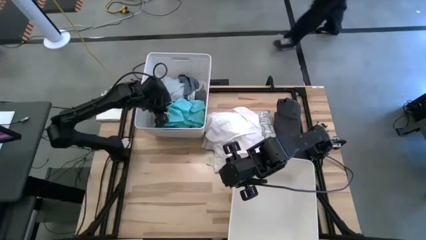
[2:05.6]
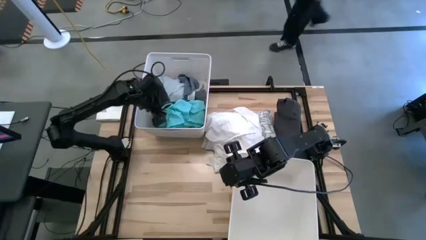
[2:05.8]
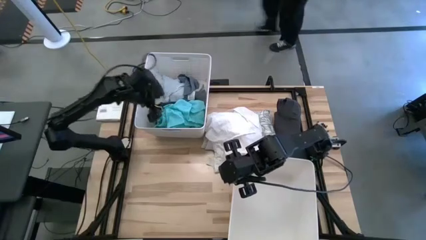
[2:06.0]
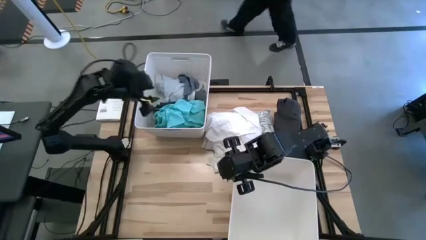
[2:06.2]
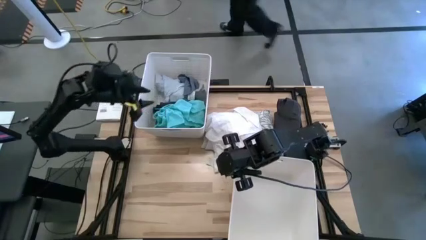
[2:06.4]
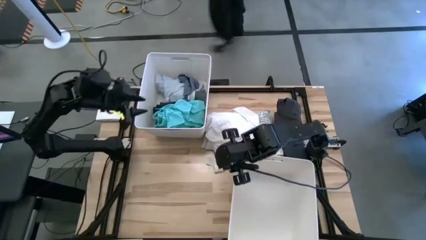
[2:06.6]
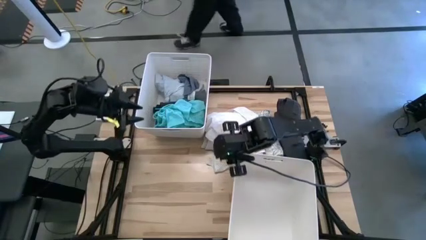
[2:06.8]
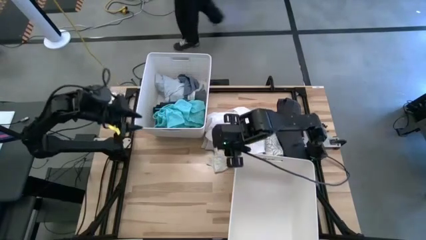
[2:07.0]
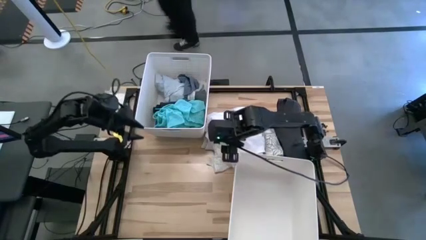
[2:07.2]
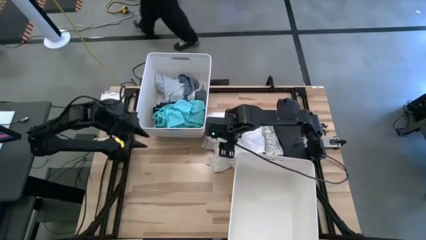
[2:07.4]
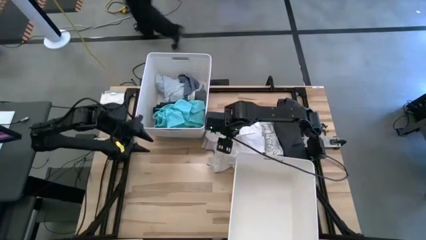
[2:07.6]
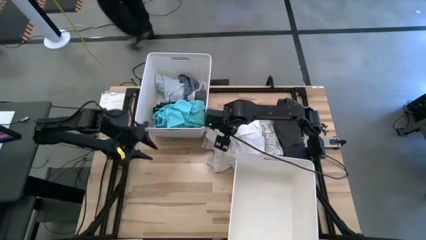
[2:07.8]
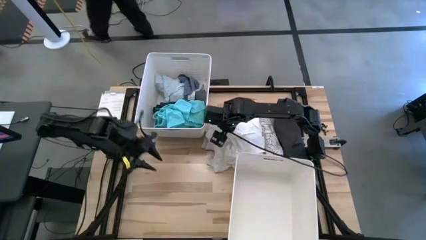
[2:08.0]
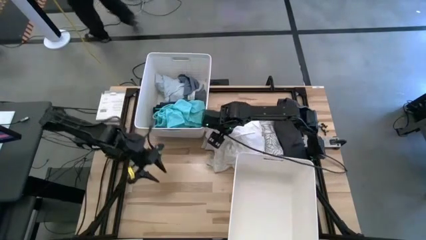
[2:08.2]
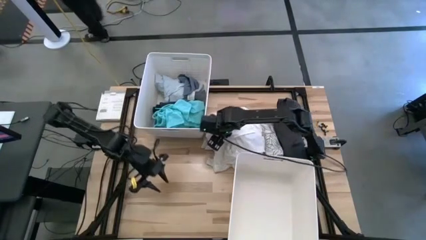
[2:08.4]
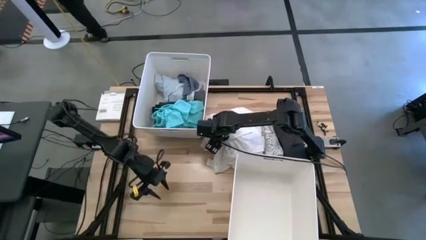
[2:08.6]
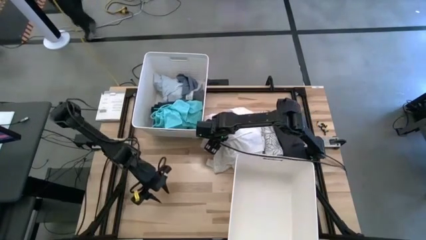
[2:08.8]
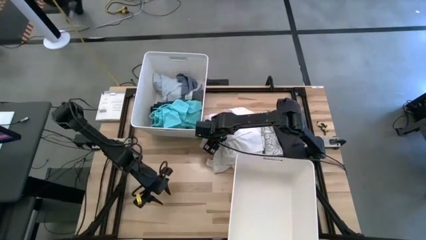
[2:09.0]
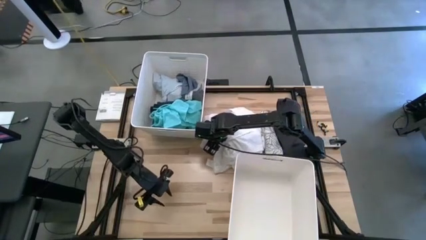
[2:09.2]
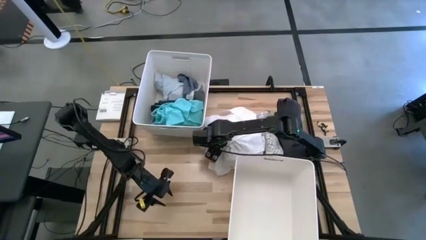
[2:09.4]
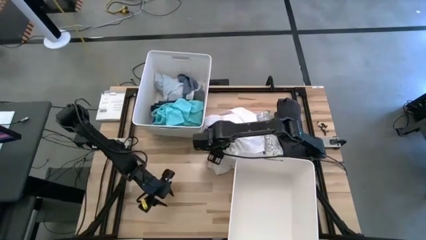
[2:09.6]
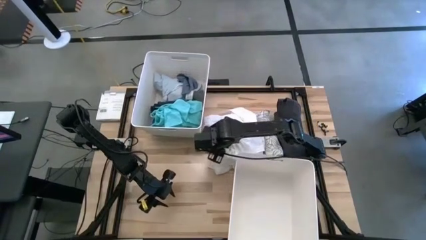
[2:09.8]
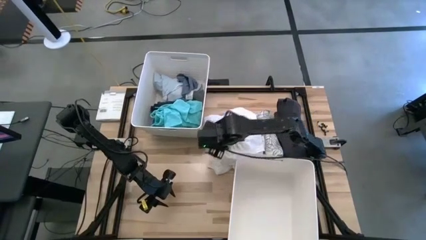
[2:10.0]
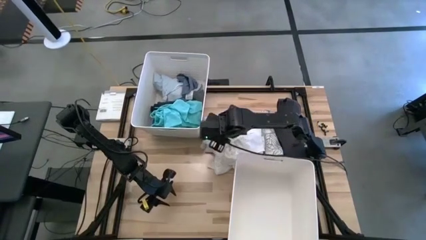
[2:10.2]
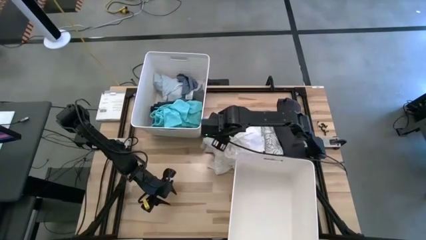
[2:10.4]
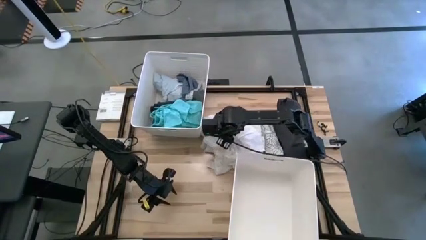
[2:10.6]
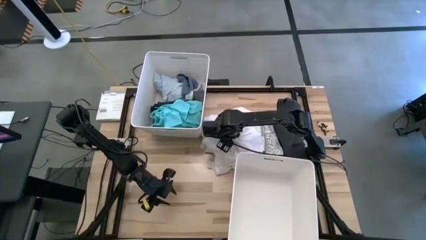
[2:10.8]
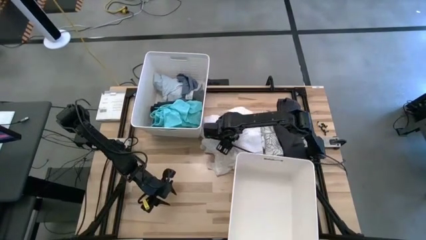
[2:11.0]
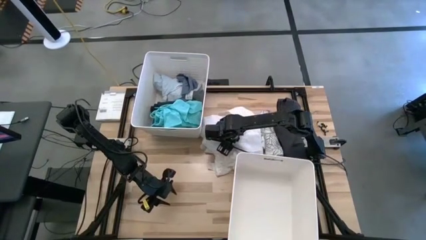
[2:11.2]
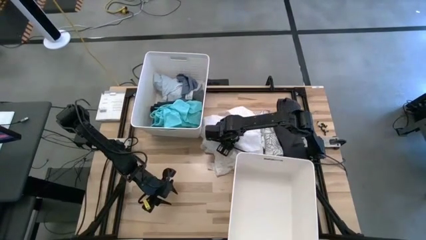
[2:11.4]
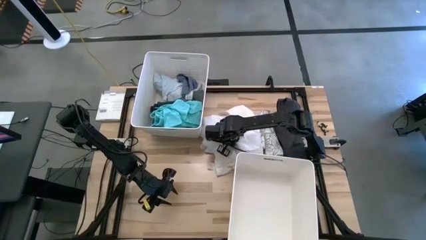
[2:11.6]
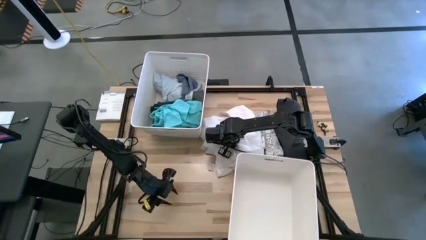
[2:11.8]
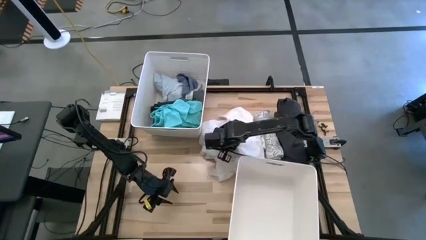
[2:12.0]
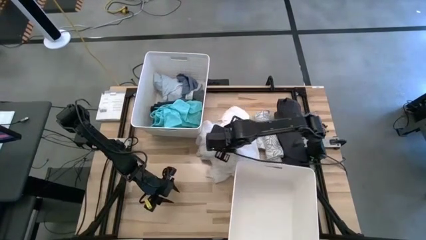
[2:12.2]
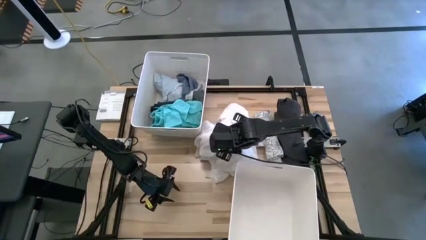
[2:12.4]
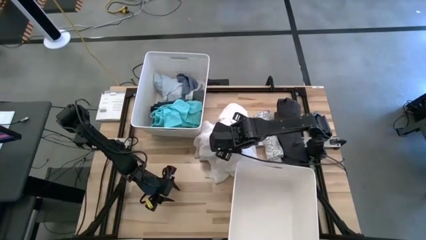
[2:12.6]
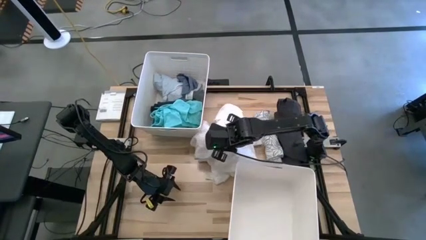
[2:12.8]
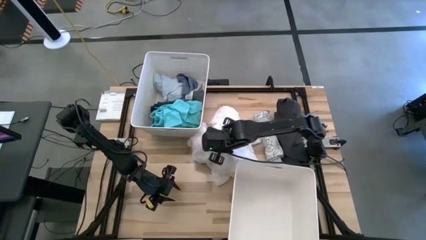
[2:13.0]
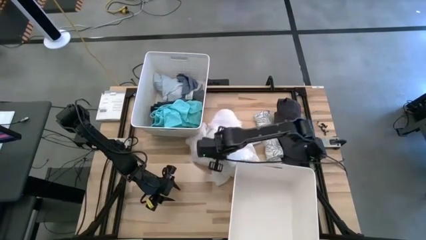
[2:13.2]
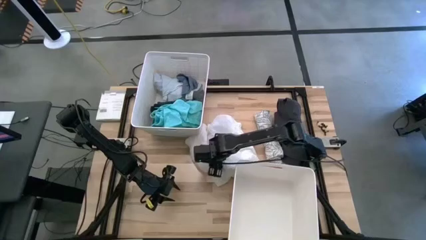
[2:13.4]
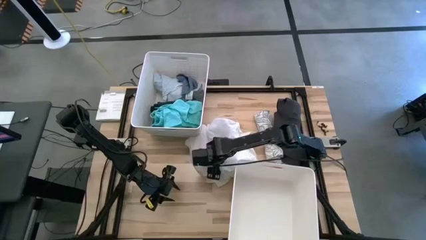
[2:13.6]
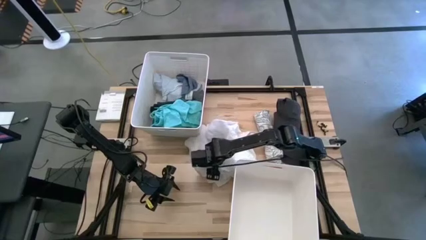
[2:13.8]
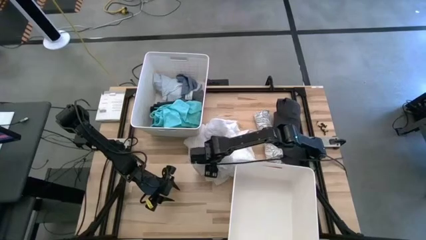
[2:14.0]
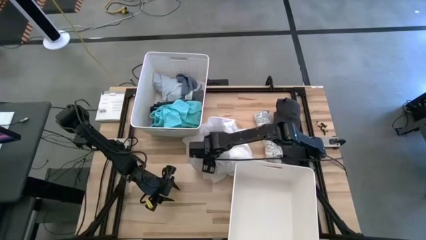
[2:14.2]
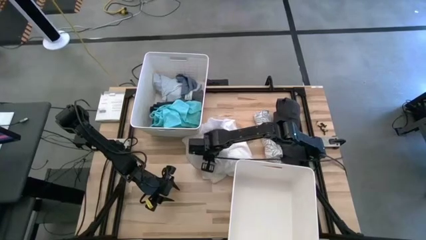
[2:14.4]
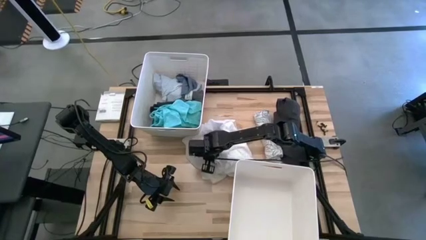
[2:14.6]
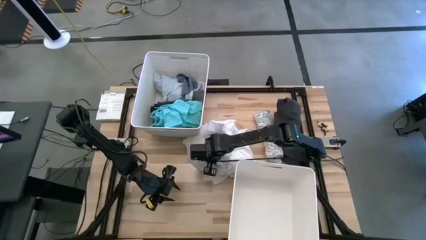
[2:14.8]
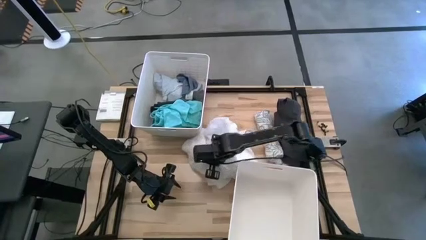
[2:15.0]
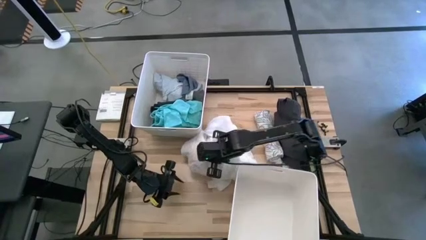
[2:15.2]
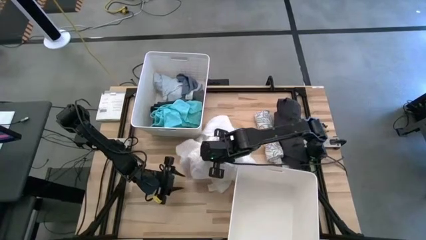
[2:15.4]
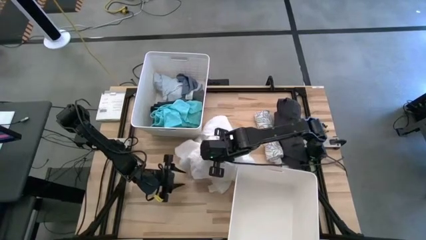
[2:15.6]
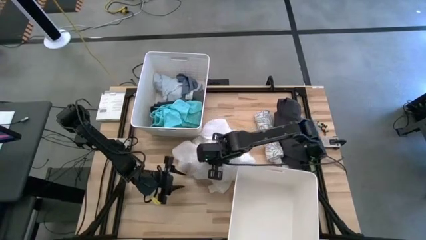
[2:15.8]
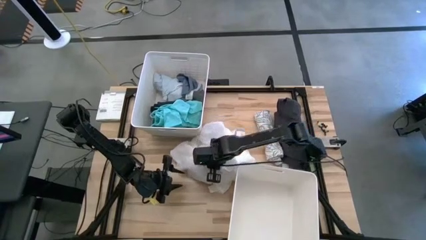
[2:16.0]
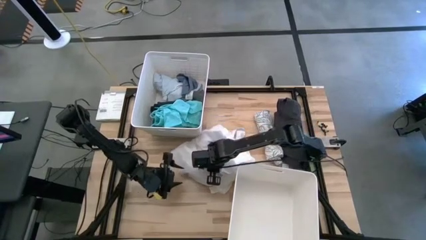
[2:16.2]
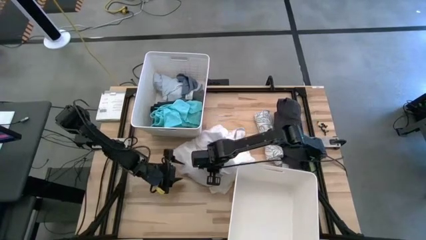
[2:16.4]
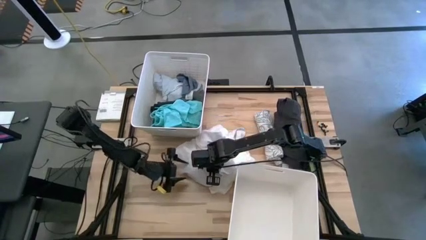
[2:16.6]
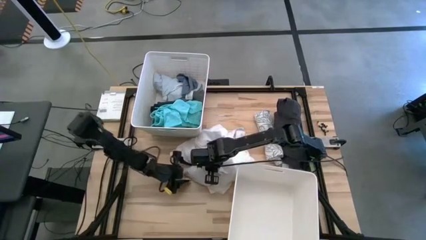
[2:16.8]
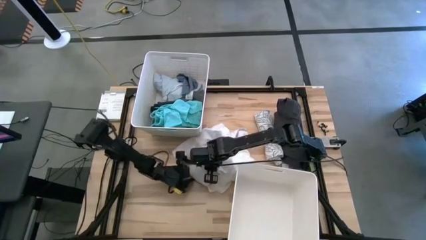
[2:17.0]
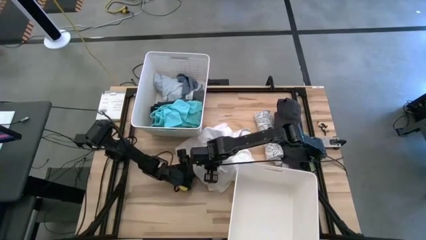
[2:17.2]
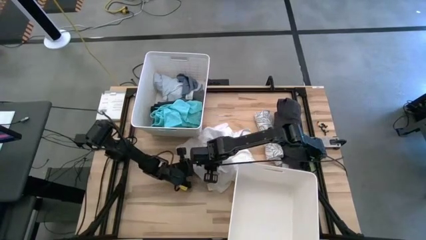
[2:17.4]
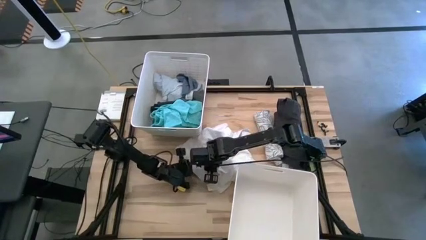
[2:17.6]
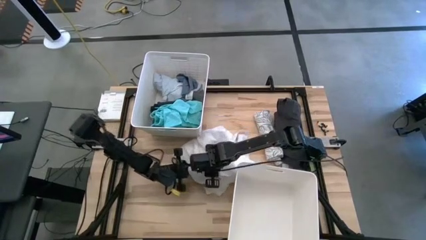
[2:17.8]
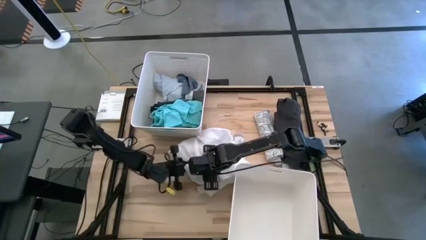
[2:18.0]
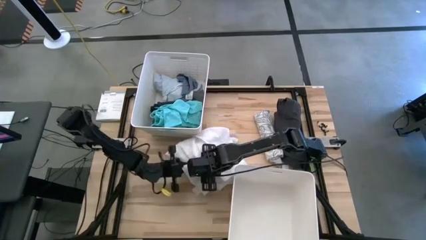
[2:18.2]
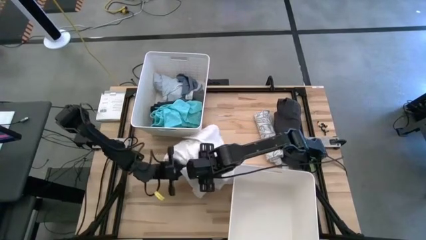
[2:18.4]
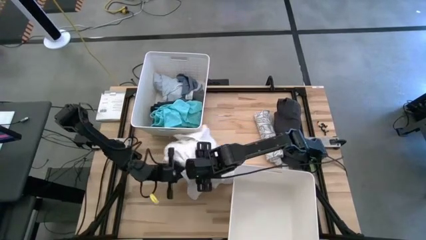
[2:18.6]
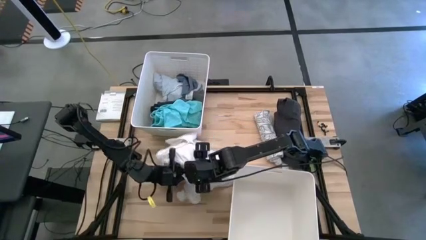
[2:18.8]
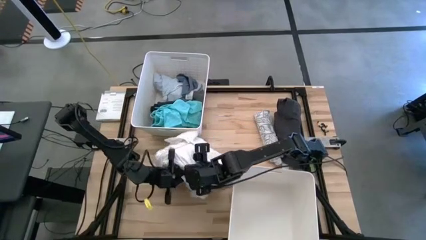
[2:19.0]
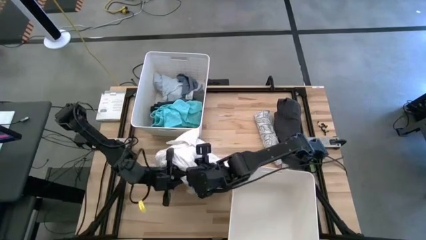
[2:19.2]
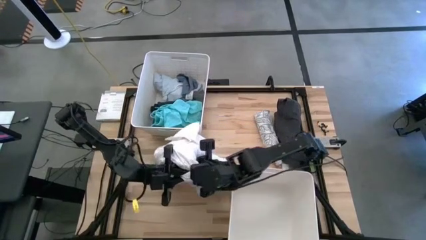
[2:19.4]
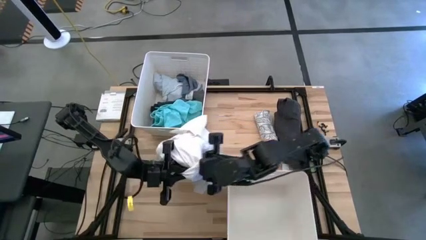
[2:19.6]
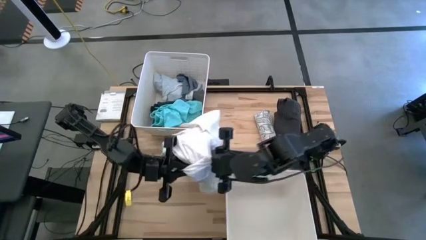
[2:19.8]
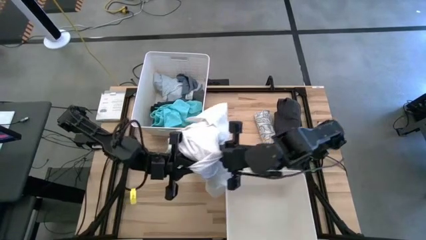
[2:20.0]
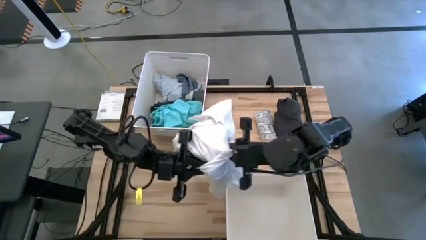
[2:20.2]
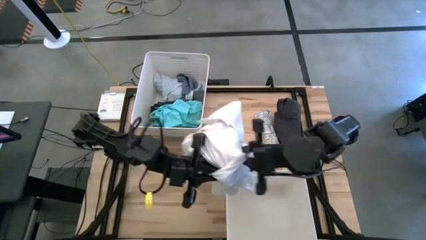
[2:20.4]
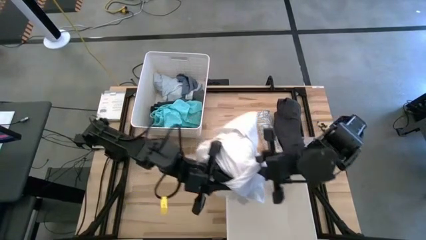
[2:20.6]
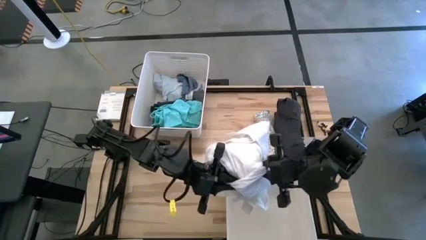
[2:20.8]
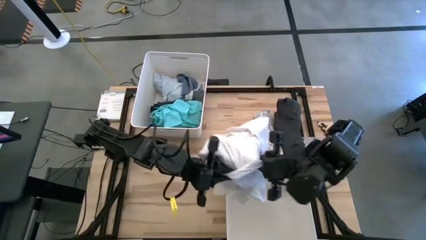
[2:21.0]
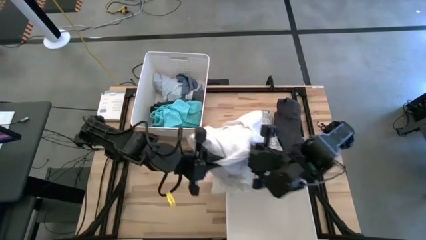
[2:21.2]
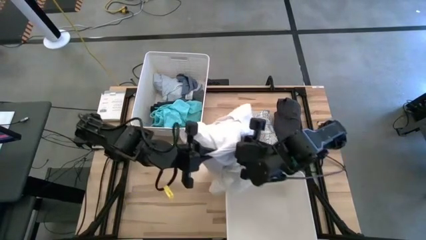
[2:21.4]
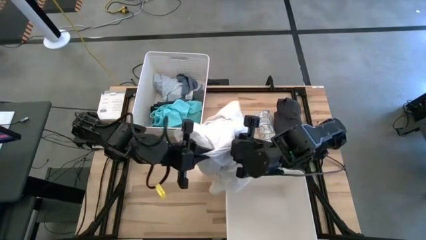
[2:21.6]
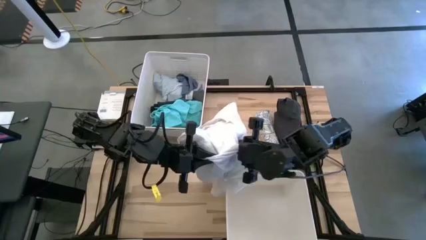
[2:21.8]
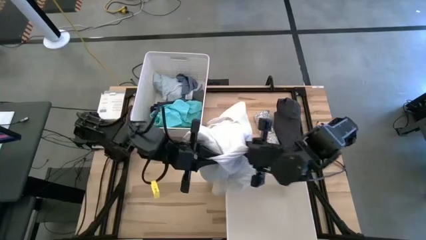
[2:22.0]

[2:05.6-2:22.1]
Task: Sort clothes
Put the white dress into the bottom white laundry bin
